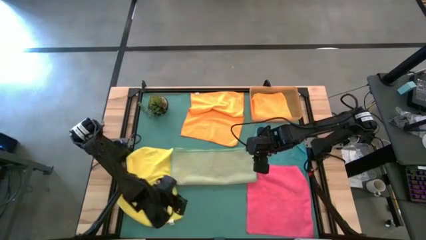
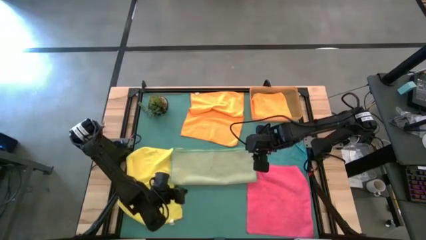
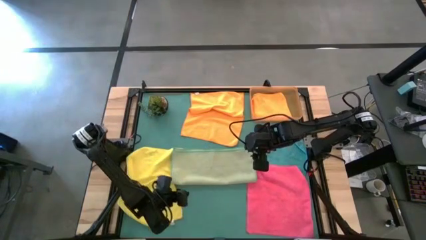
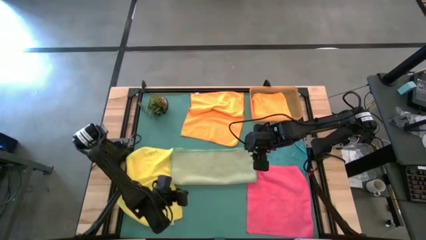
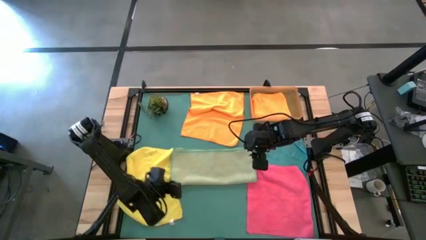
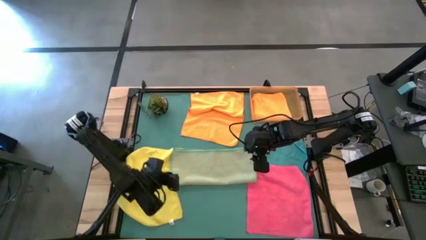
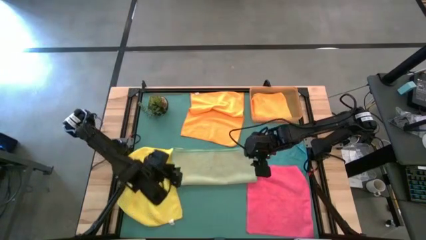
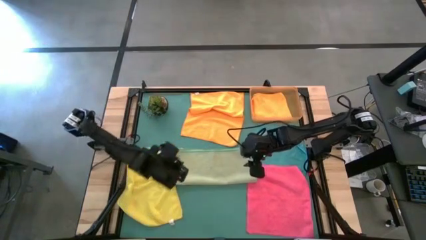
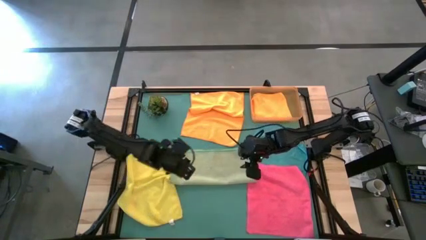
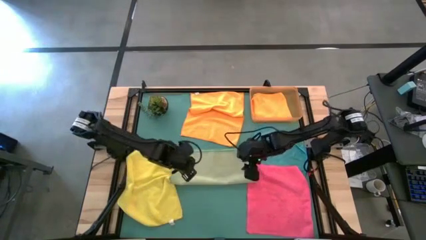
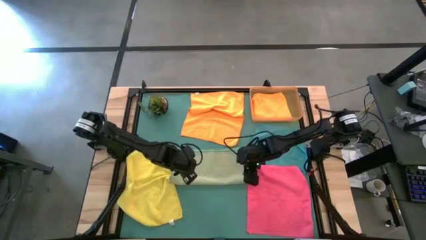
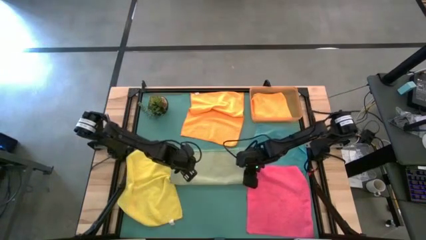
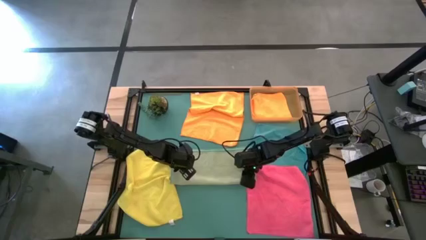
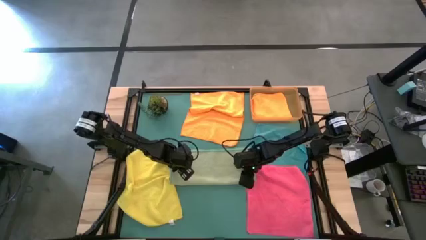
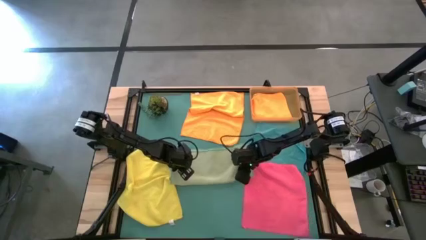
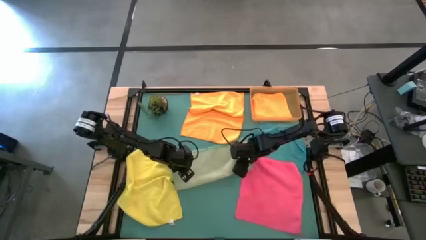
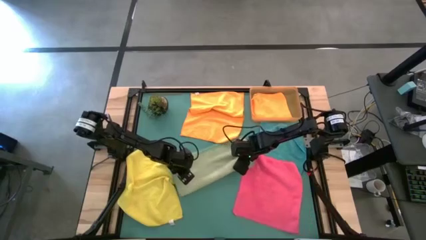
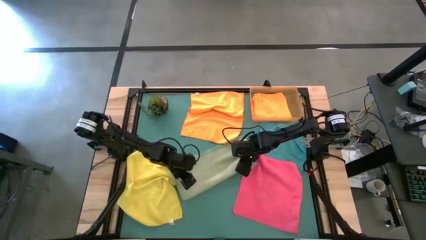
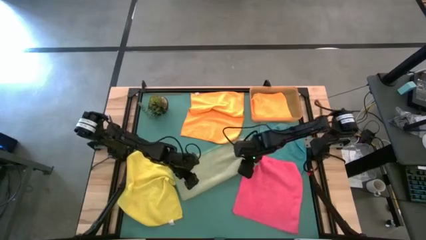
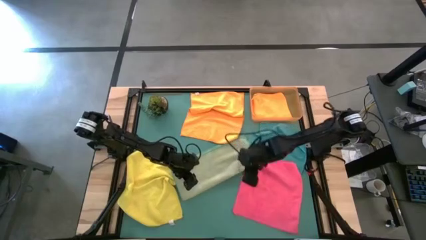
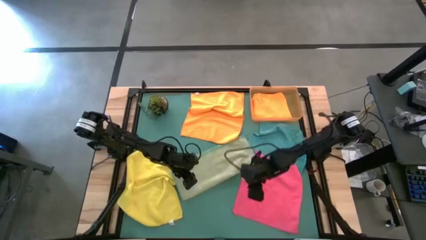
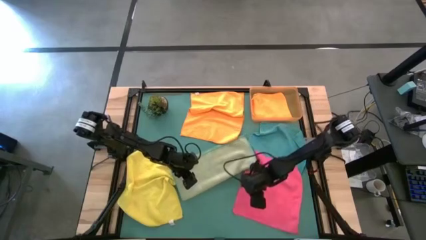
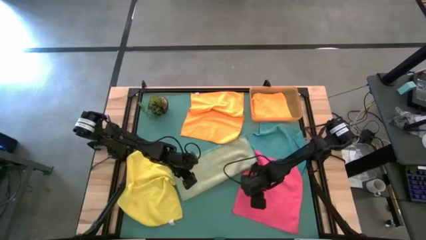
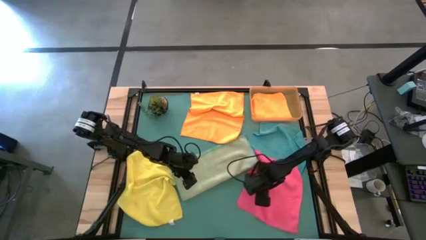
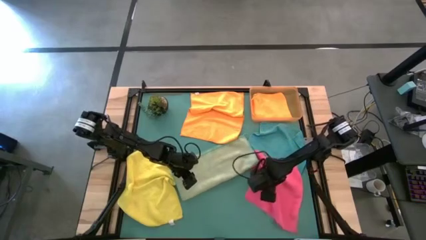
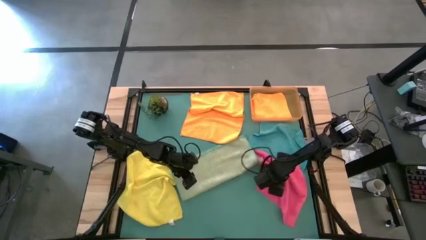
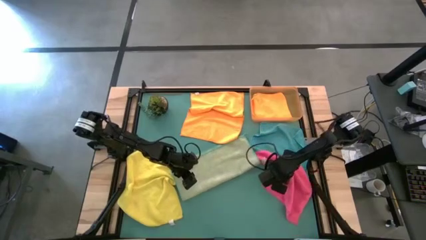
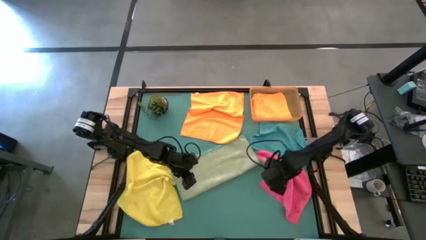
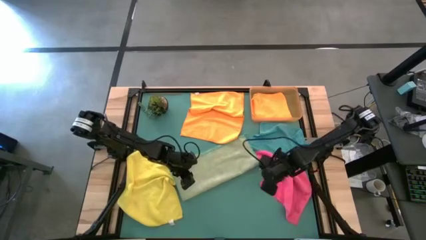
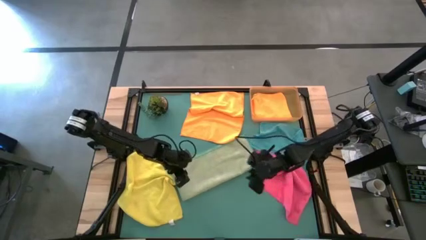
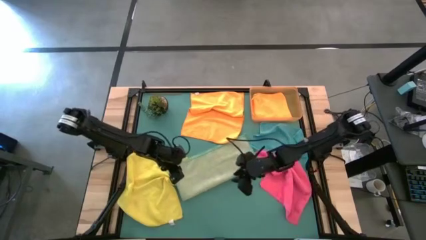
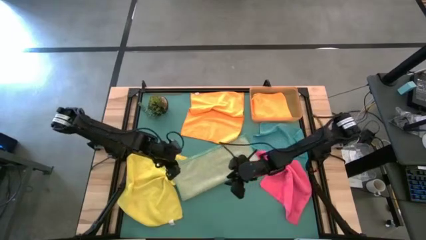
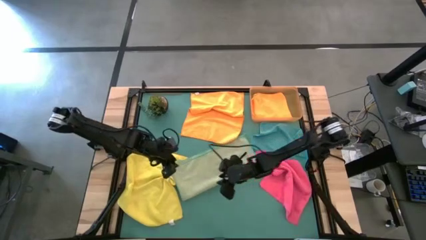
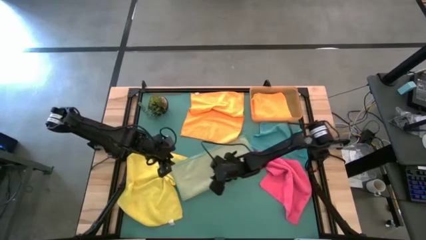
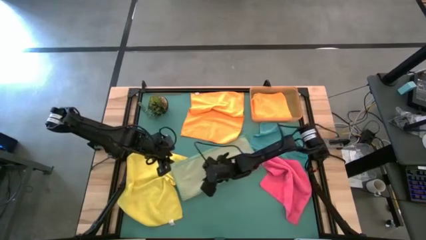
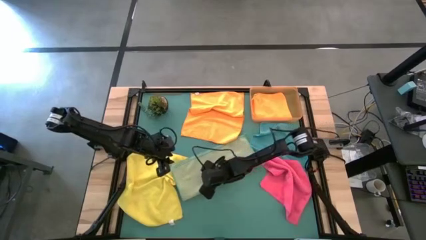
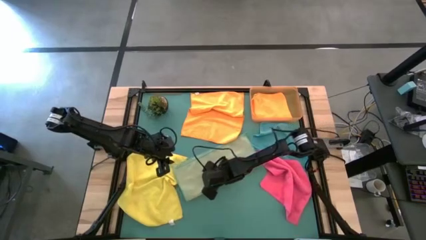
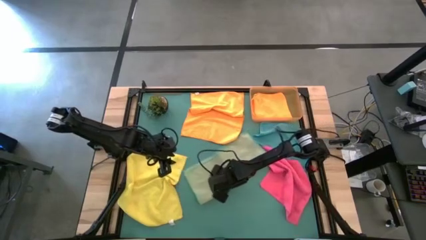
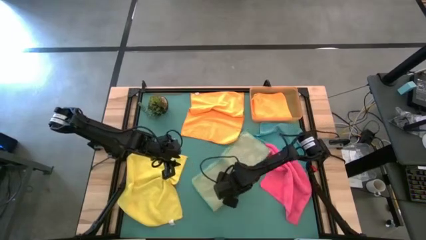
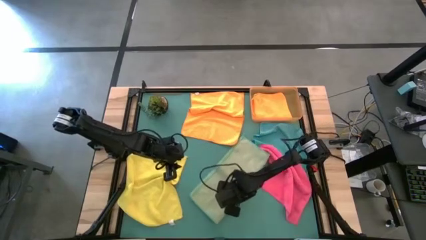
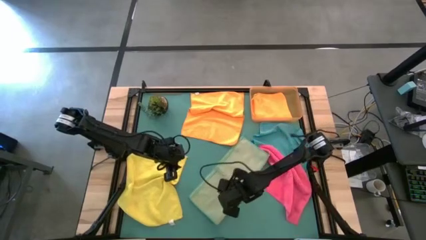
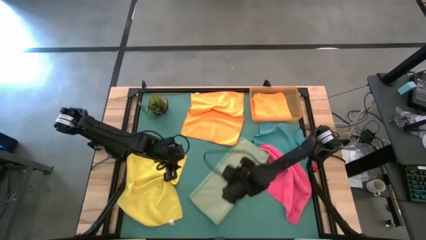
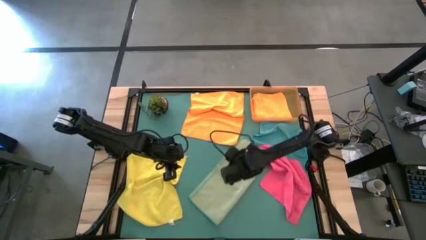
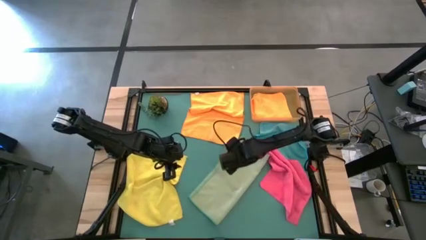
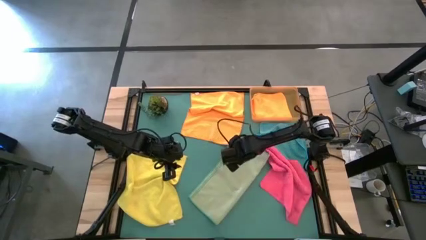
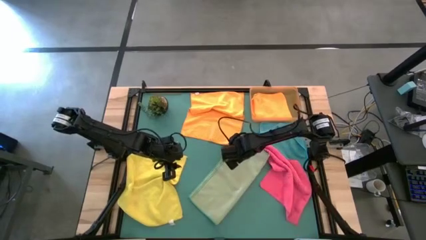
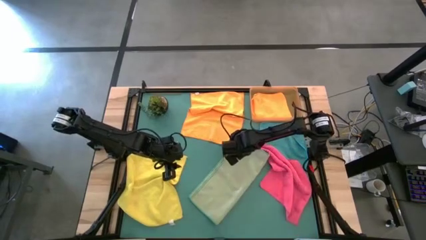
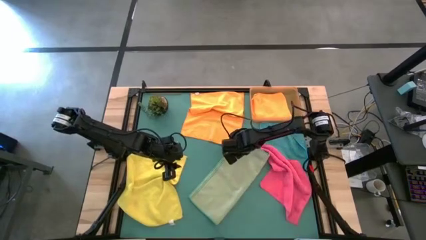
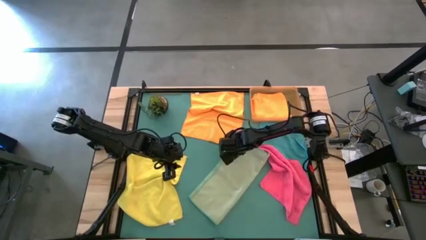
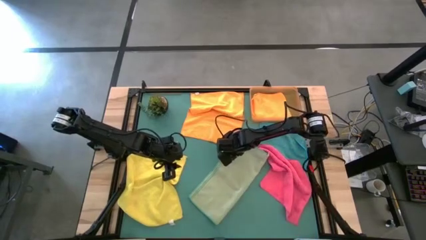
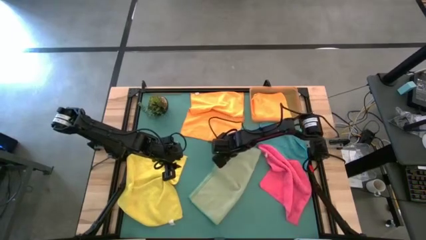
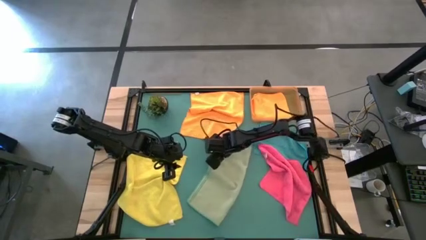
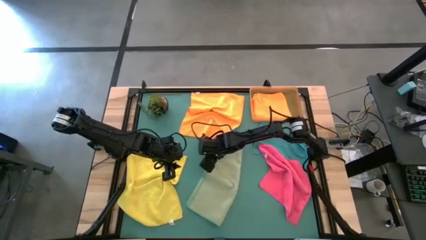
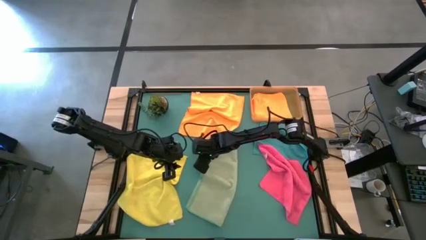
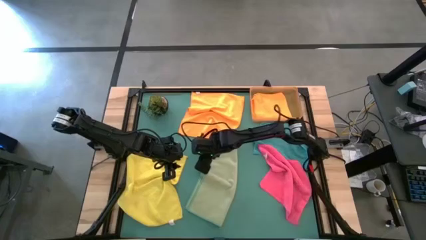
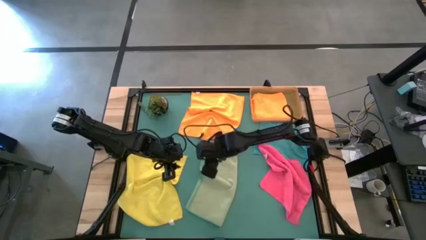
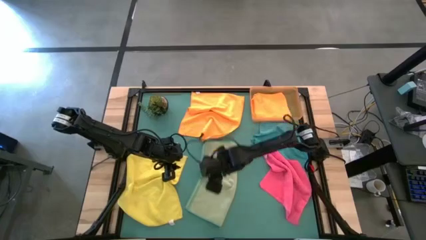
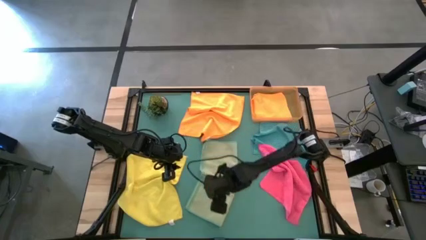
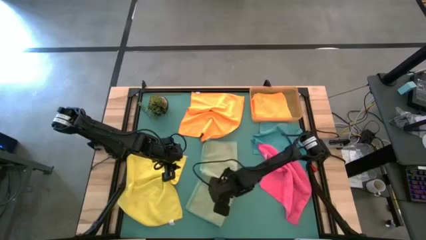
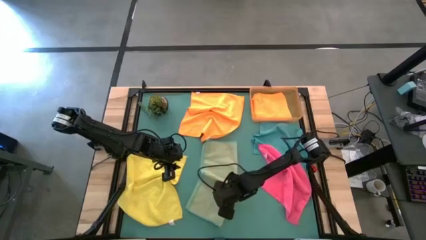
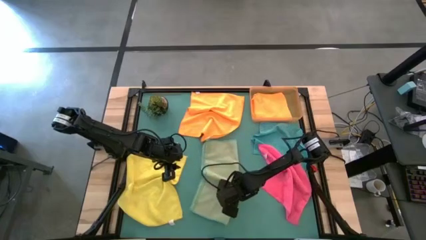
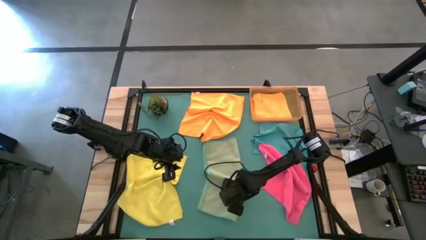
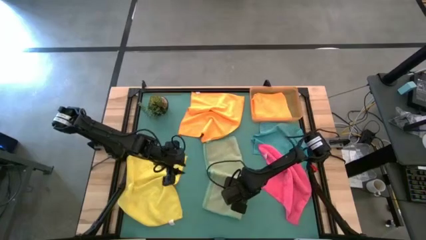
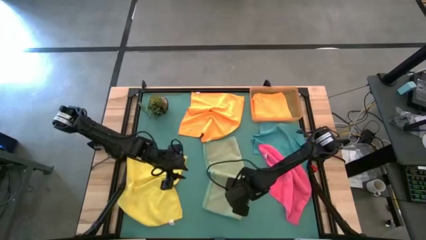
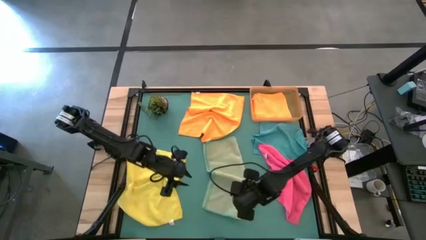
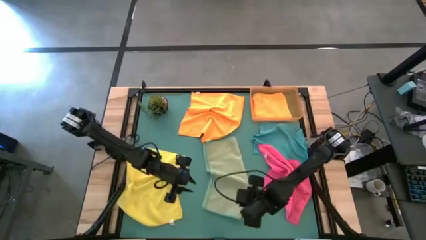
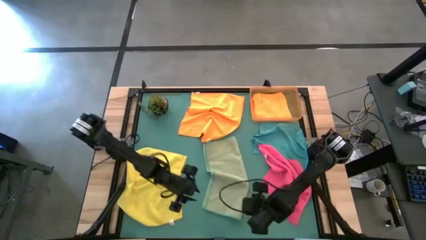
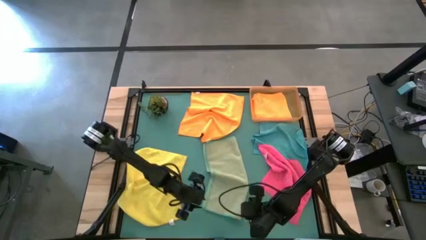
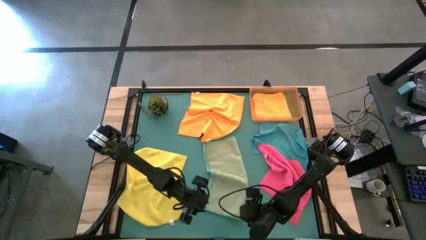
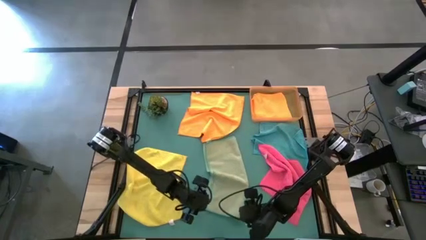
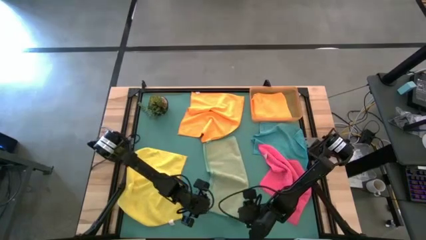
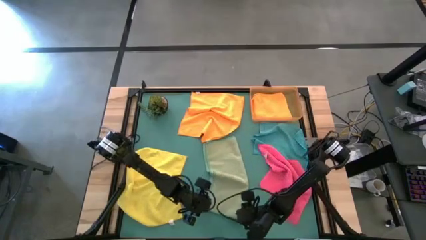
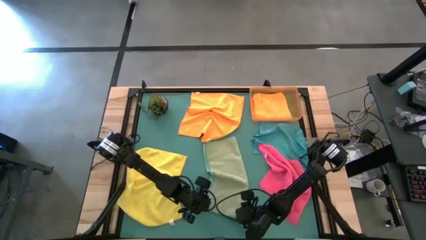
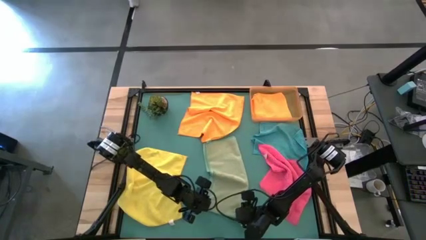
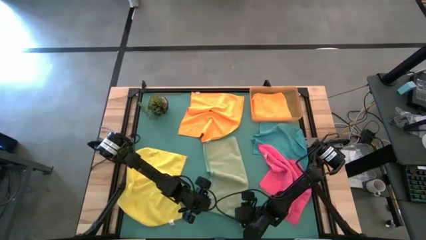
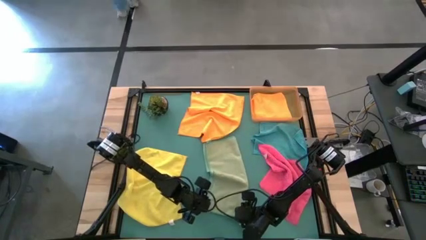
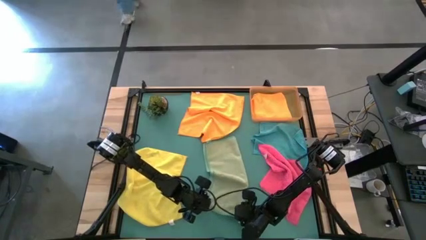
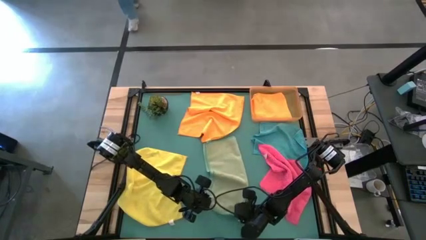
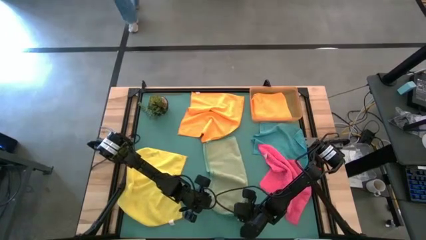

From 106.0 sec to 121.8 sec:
Task: Fold microfiber towels
Fold the light green microfiber towel
